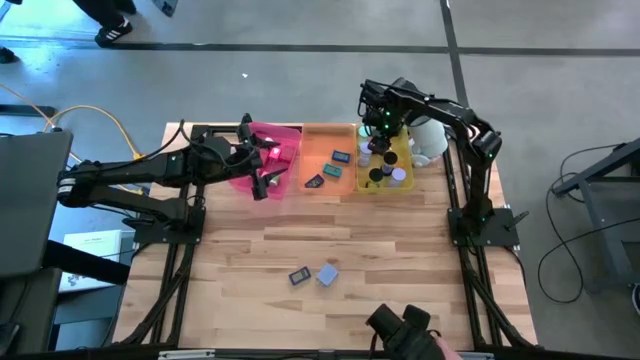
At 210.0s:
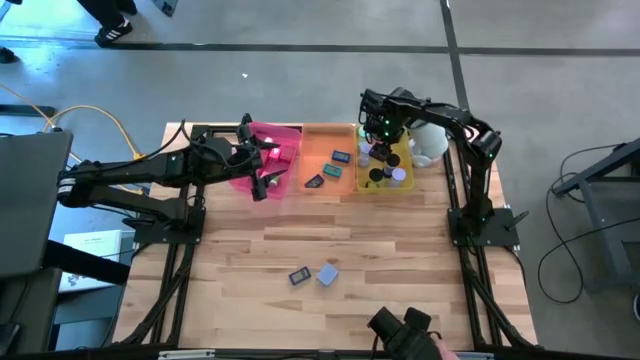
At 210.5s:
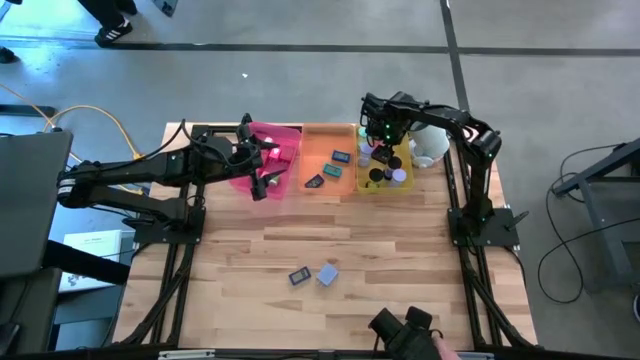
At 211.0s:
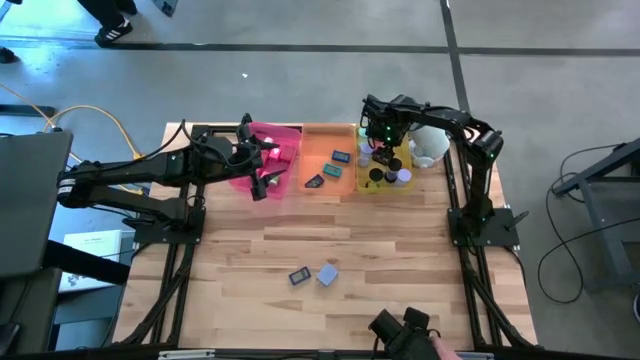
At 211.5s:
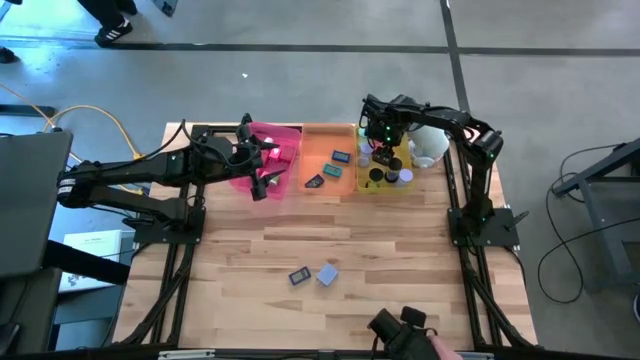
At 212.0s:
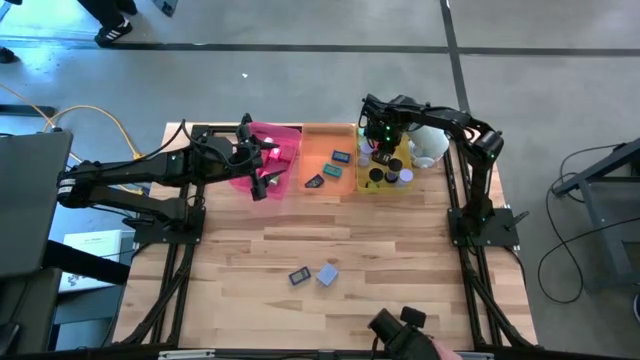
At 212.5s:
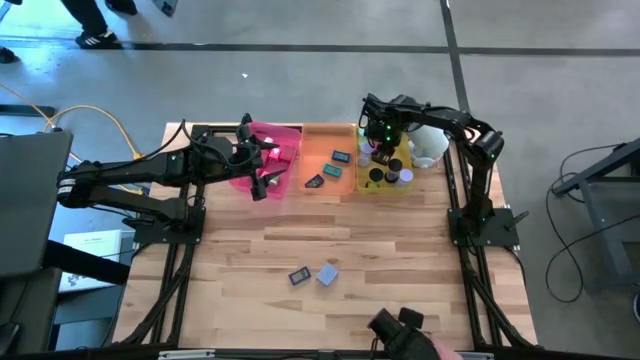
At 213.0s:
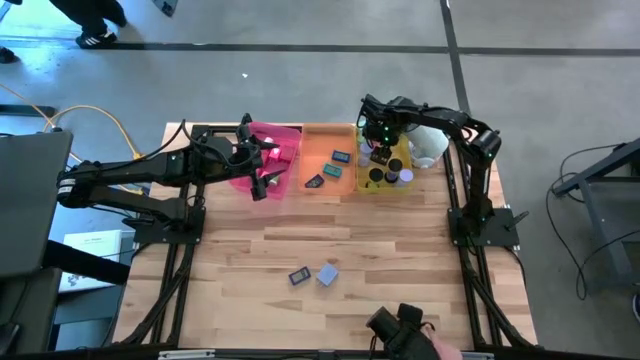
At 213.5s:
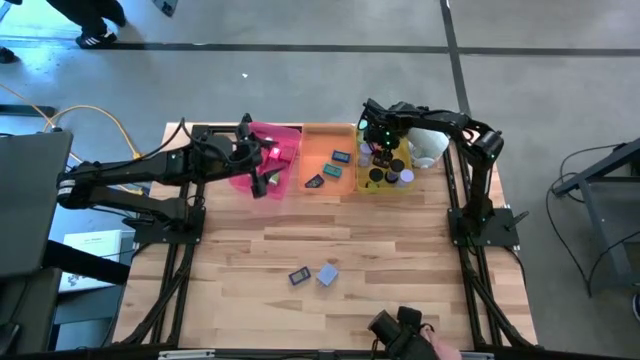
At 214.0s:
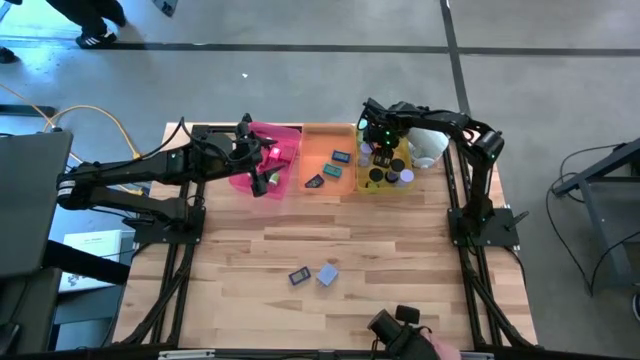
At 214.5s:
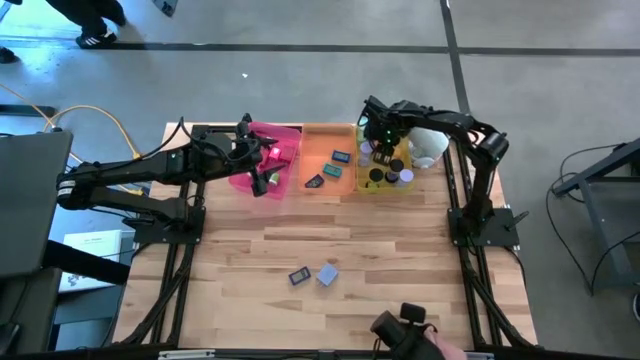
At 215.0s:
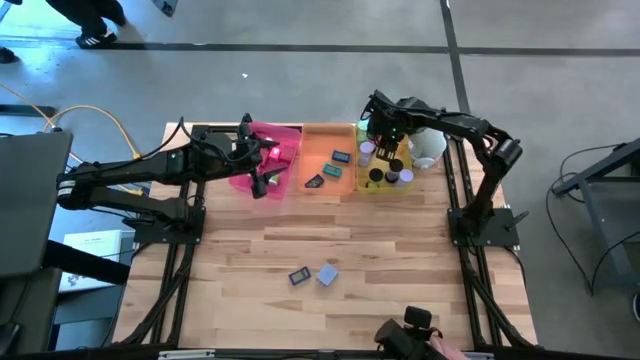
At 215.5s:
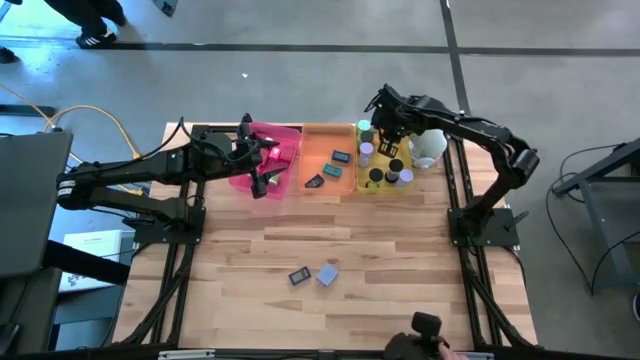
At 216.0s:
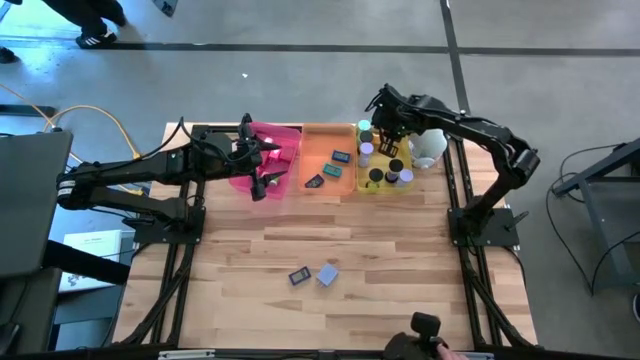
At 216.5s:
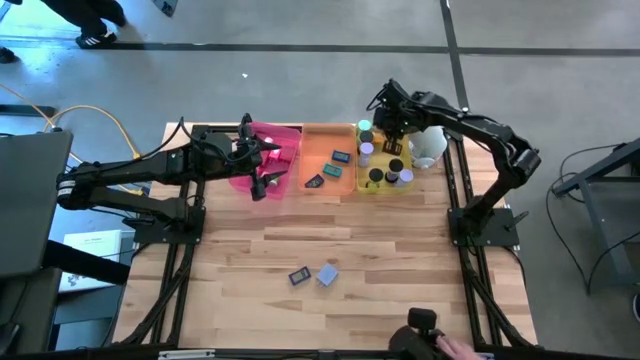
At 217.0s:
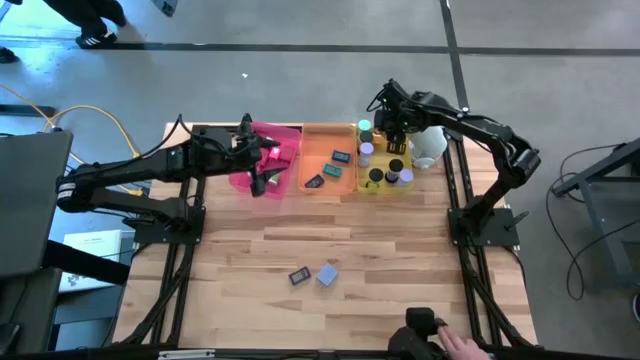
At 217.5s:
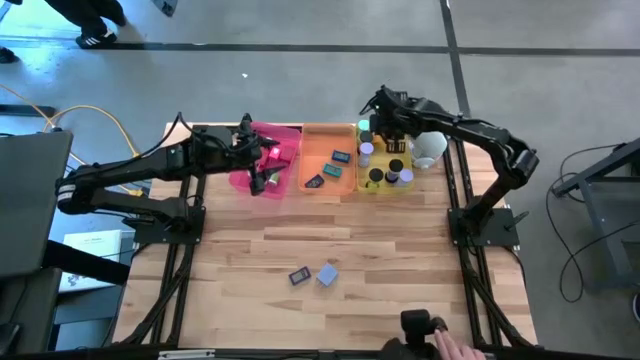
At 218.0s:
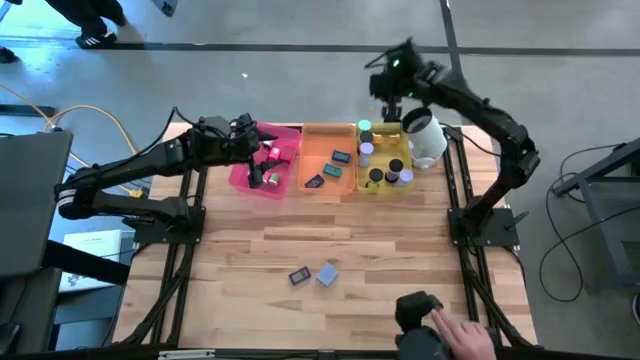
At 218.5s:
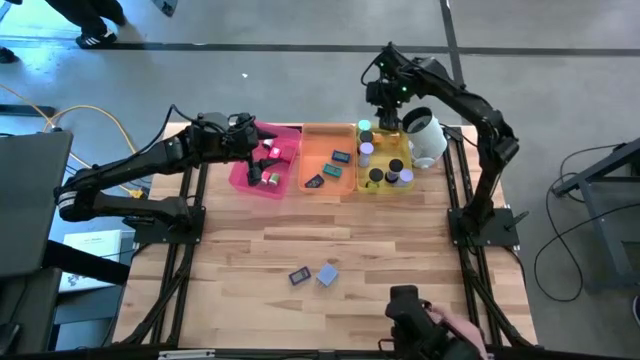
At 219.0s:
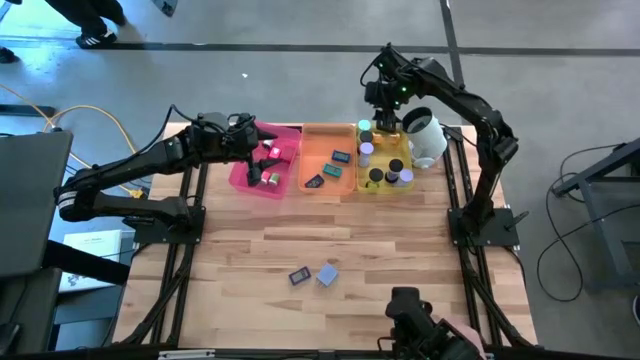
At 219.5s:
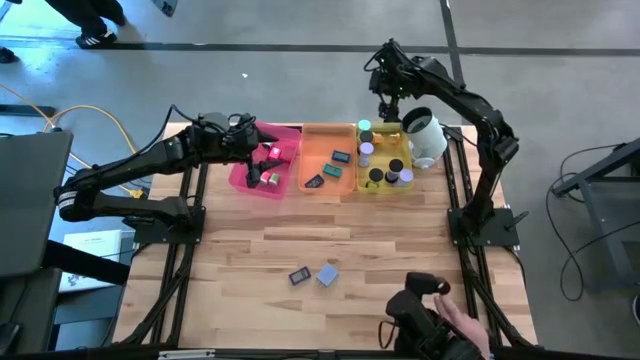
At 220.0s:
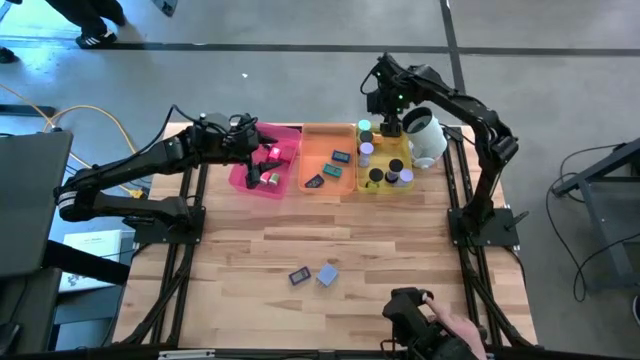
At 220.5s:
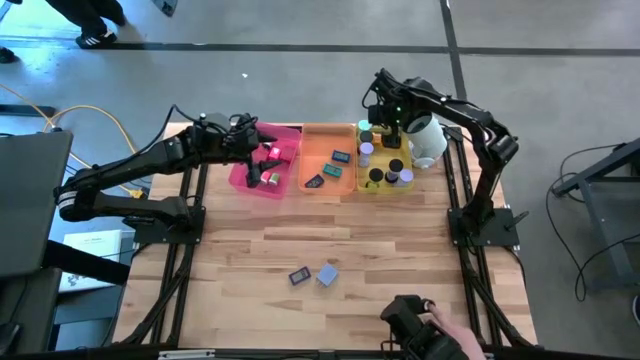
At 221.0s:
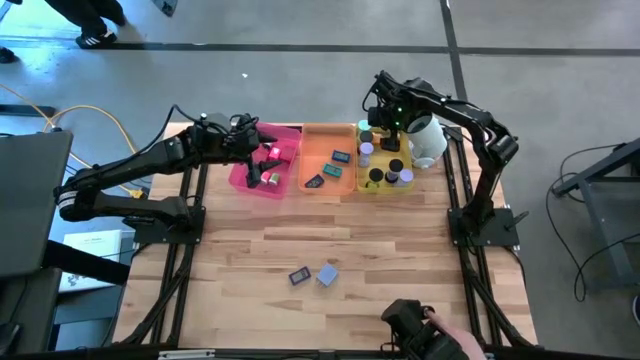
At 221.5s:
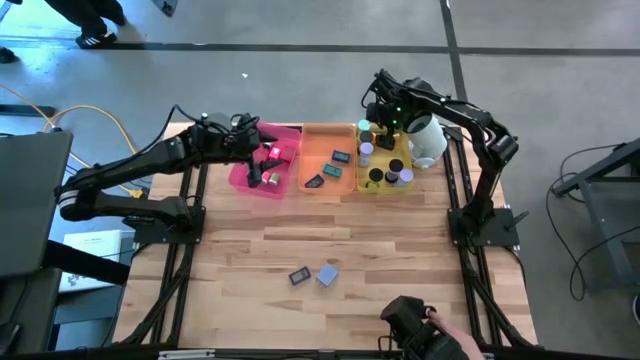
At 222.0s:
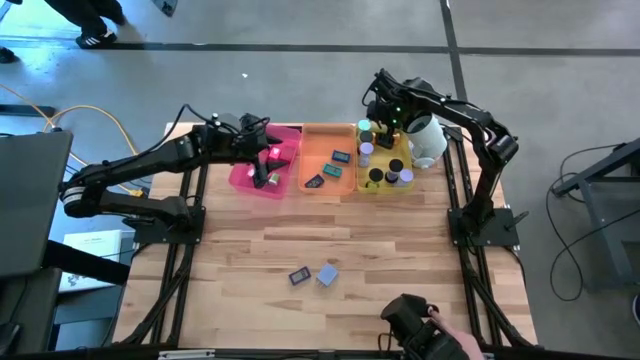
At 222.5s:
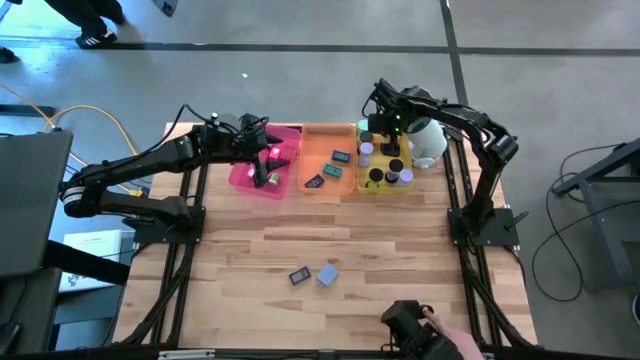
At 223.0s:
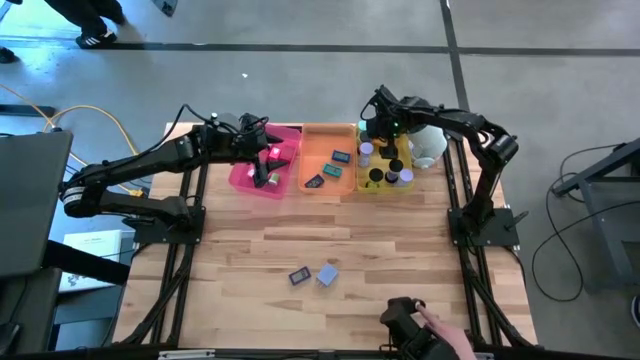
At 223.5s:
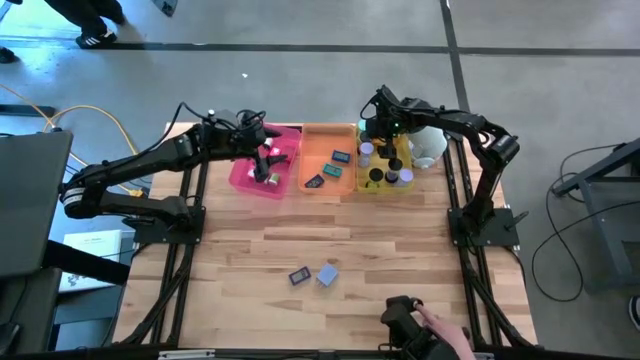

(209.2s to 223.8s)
Task: Pick & Place Office items
Put the yellow hourglass into the yellow bin

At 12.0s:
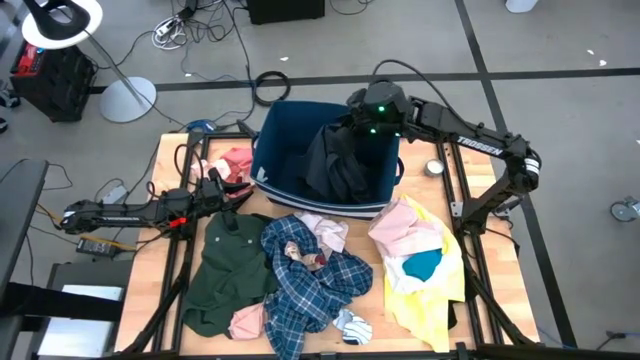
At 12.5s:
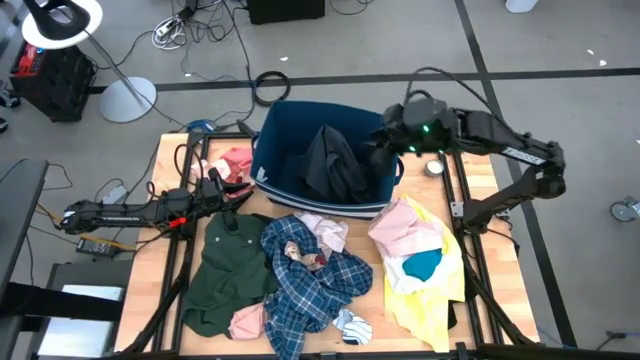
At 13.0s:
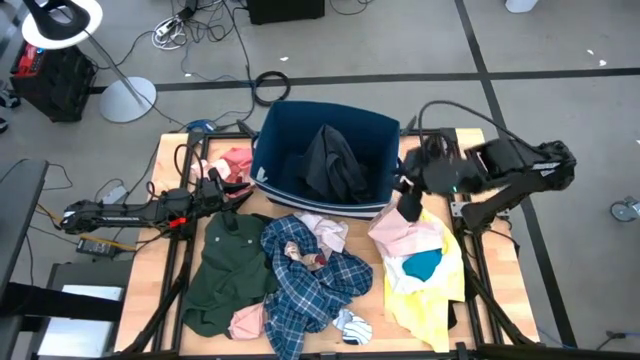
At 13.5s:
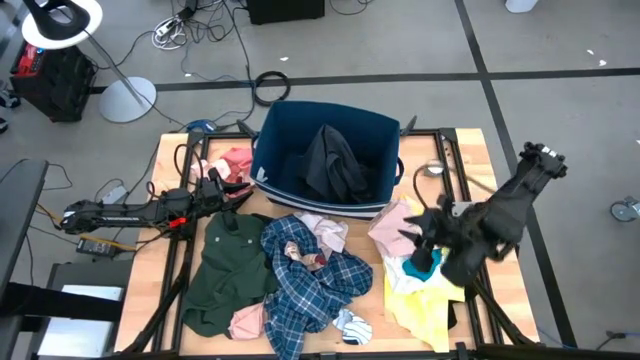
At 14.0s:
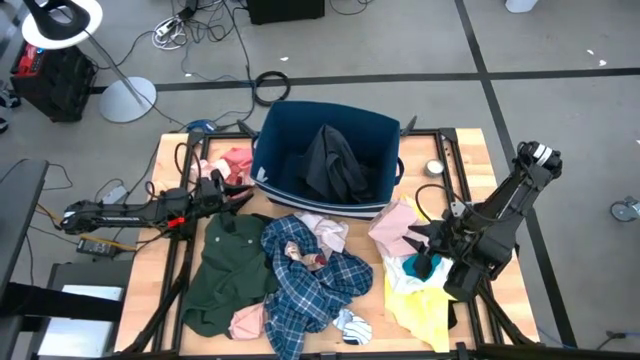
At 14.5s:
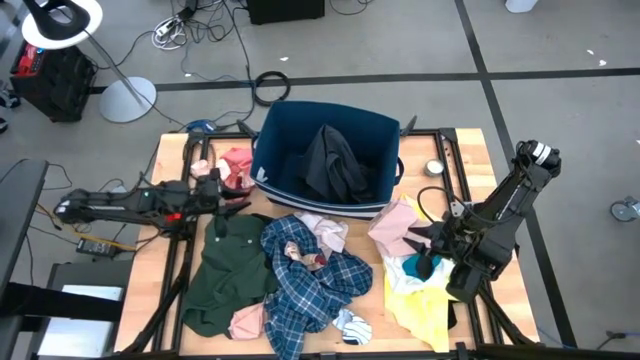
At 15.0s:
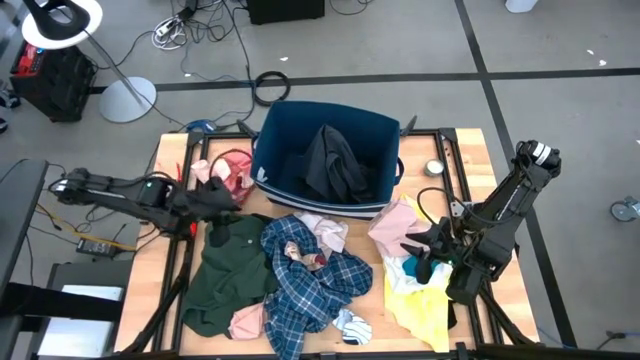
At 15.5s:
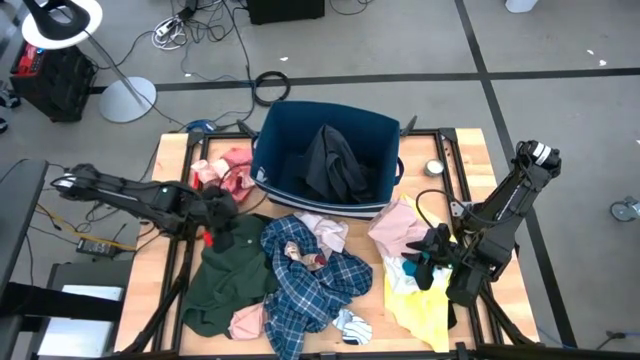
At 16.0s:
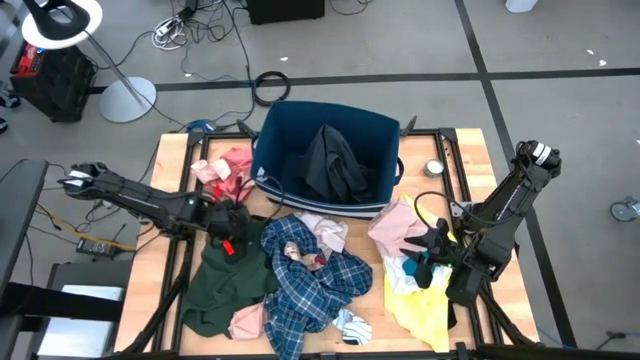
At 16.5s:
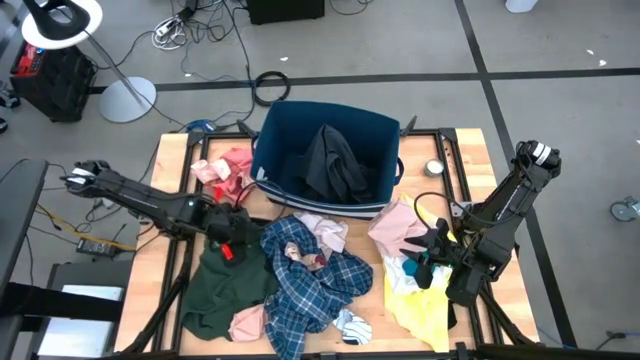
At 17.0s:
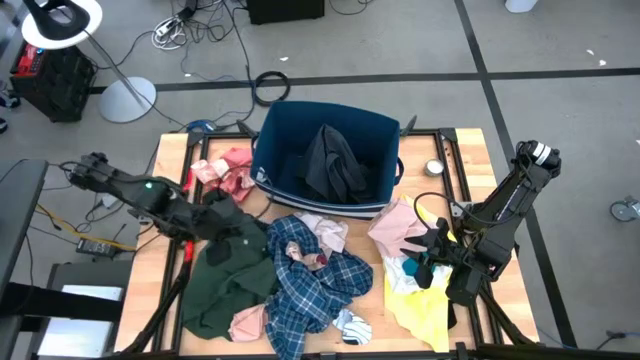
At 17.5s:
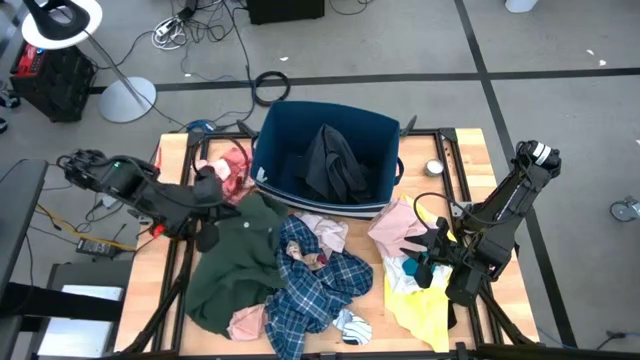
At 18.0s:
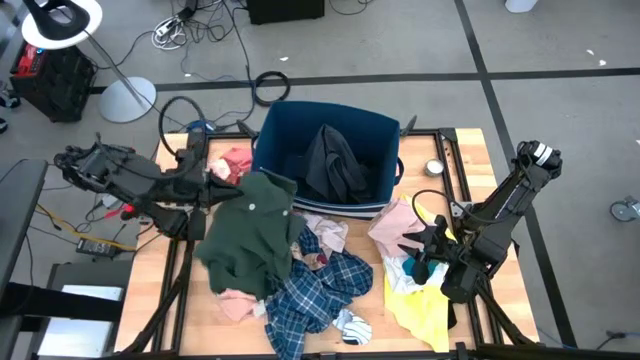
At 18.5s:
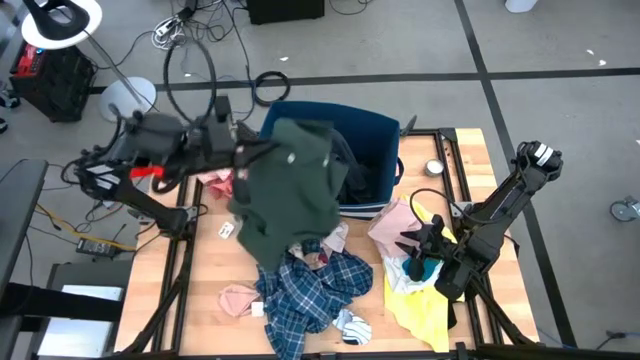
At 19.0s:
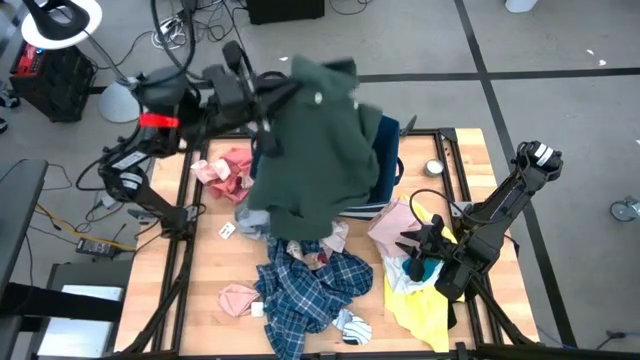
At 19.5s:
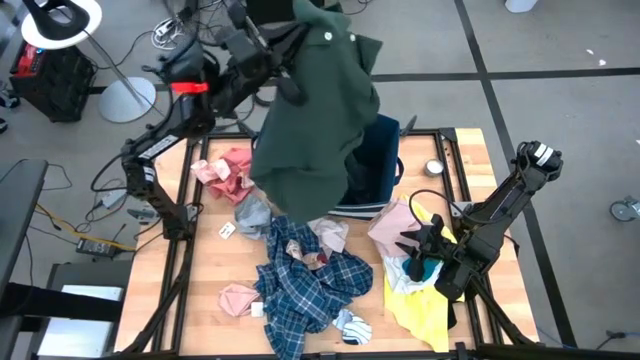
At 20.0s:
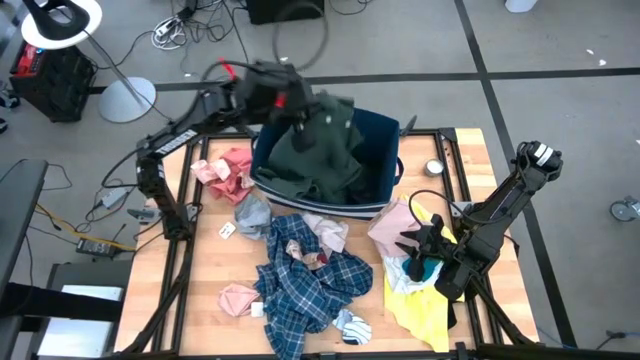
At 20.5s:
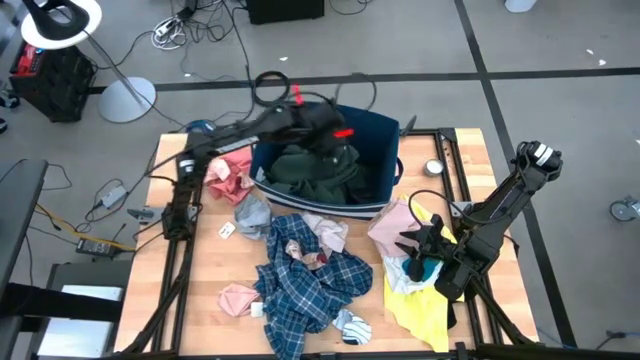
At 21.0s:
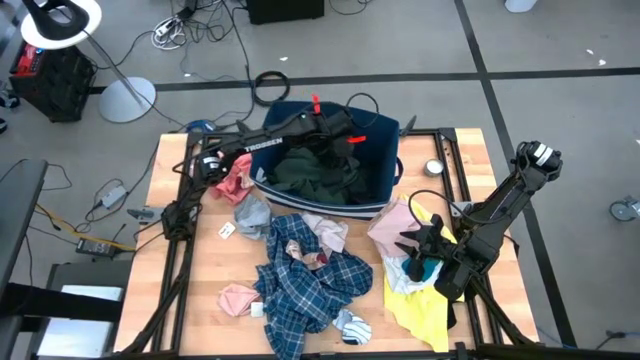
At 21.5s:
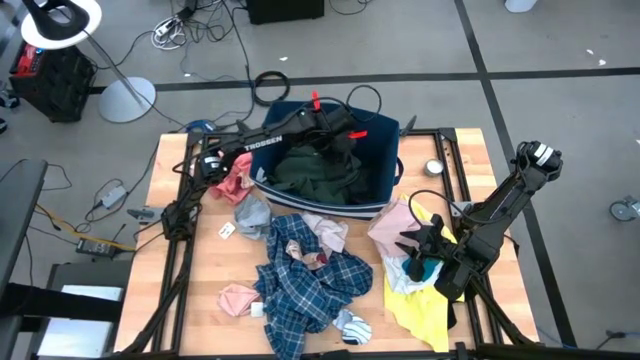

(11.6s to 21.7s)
Task: Sort clothes
Put the green shirt into the blue bin
